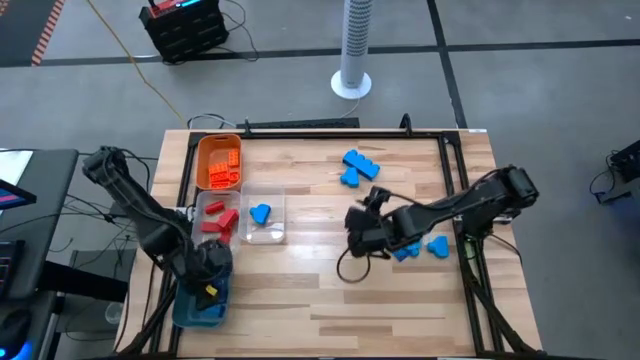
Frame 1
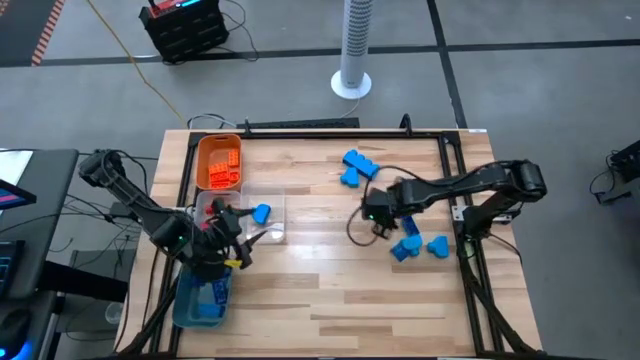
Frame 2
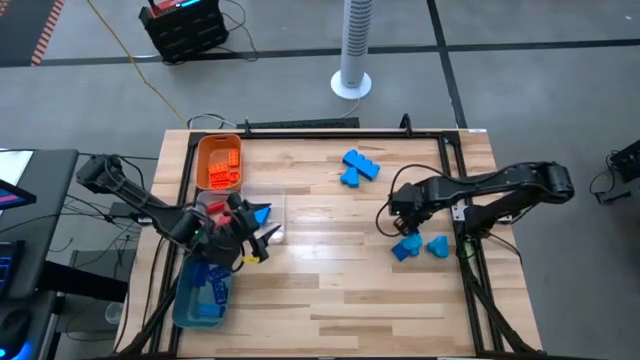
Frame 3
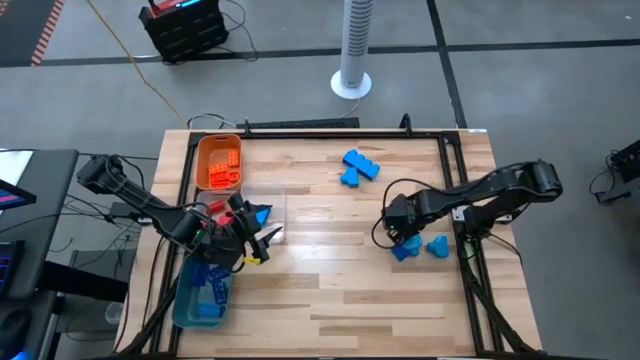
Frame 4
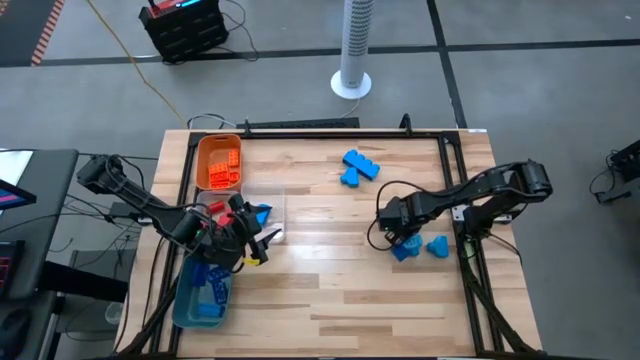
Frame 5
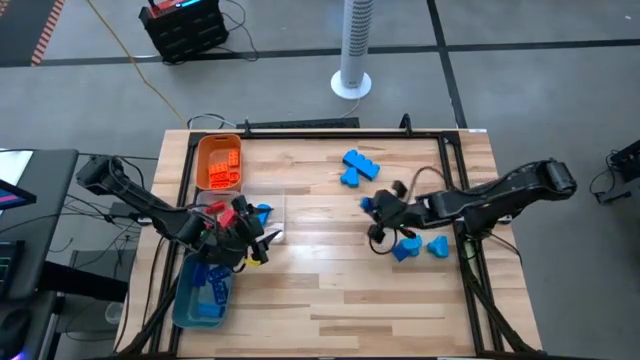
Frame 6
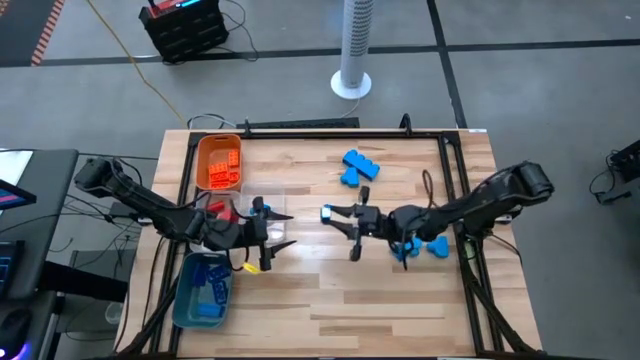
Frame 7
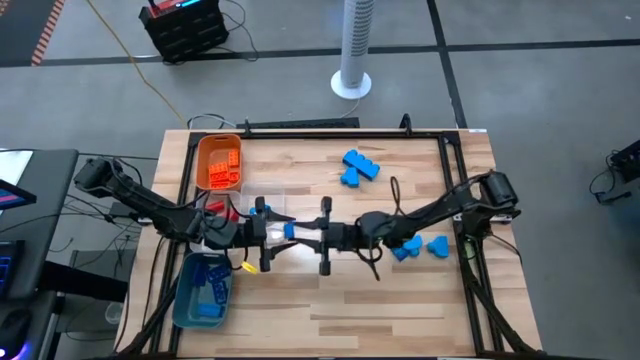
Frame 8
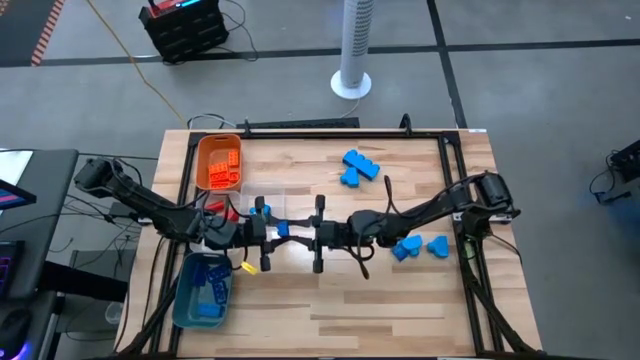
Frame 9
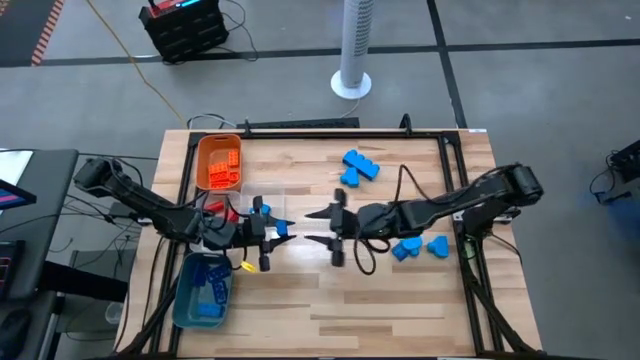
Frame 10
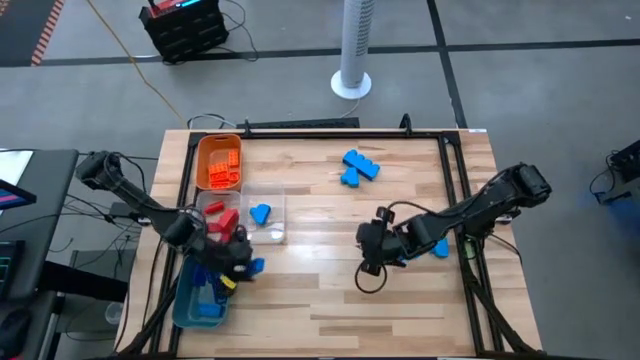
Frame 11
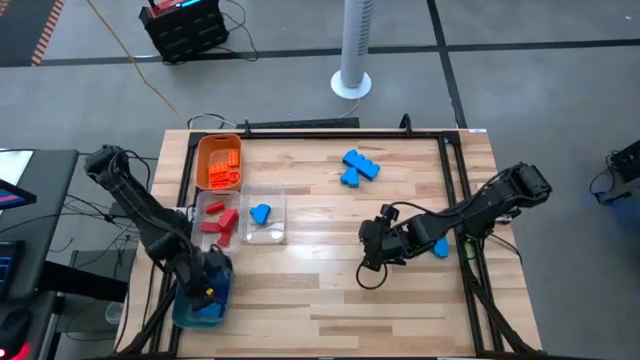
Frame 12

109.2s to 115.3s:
Task: Sort blocks
Put the blue game piece into the blue bin

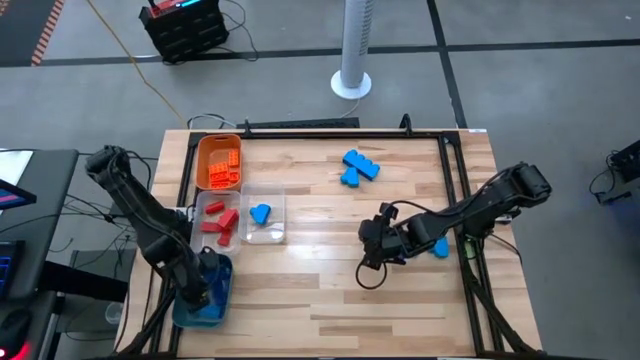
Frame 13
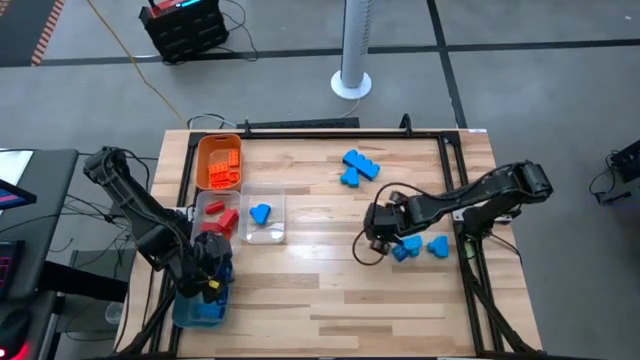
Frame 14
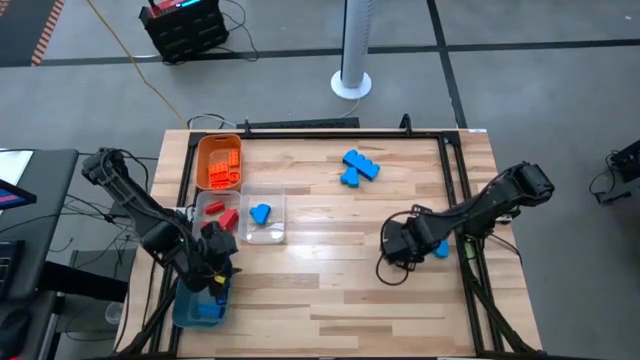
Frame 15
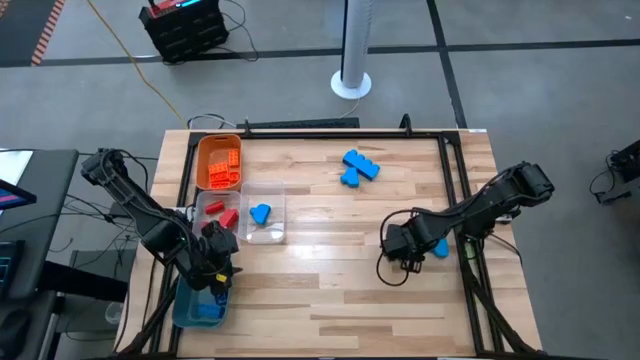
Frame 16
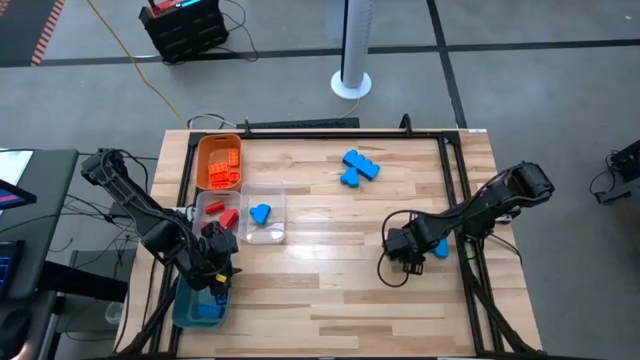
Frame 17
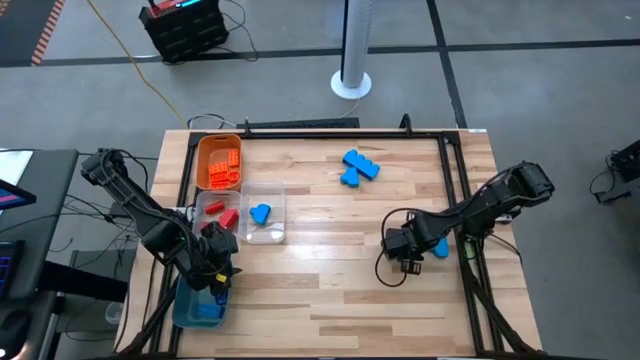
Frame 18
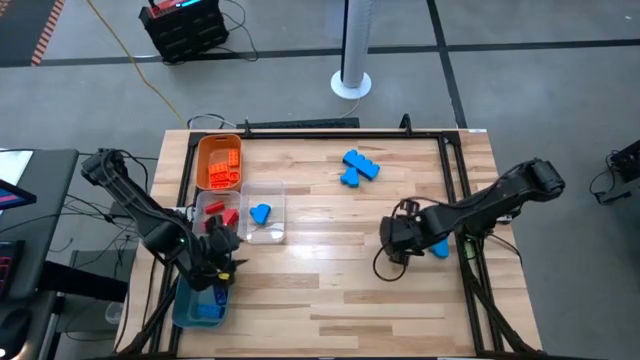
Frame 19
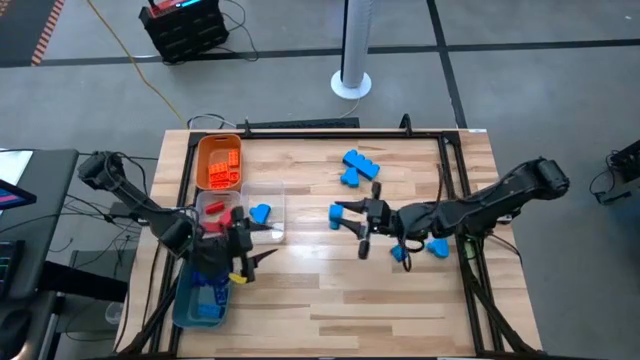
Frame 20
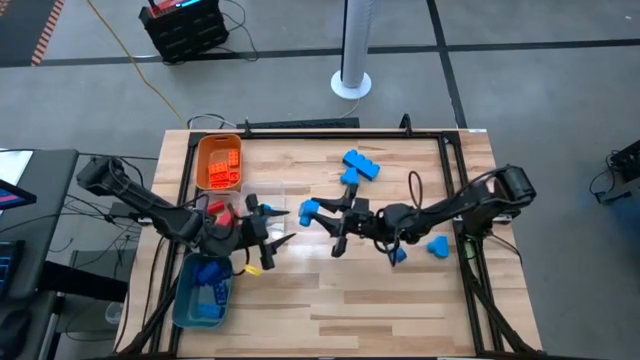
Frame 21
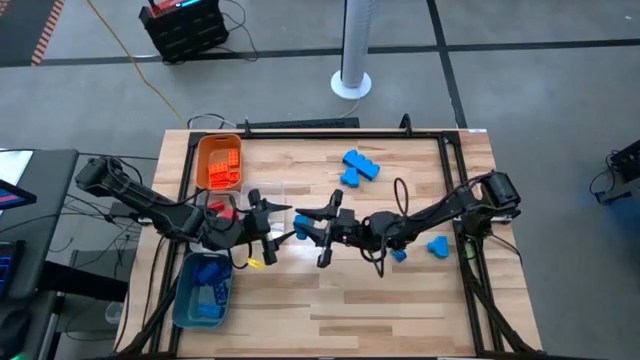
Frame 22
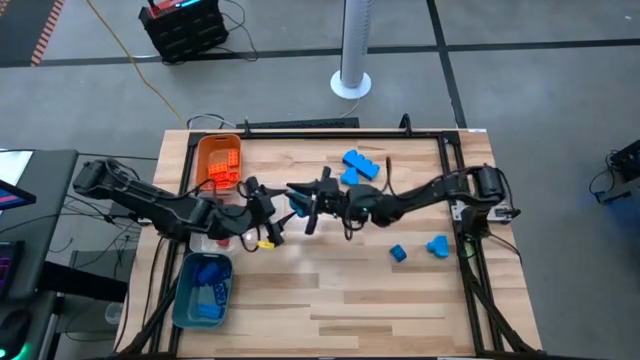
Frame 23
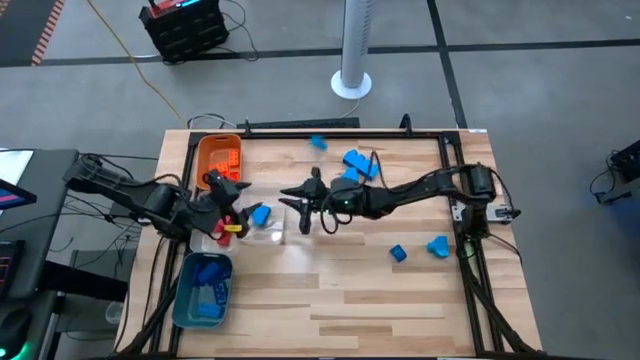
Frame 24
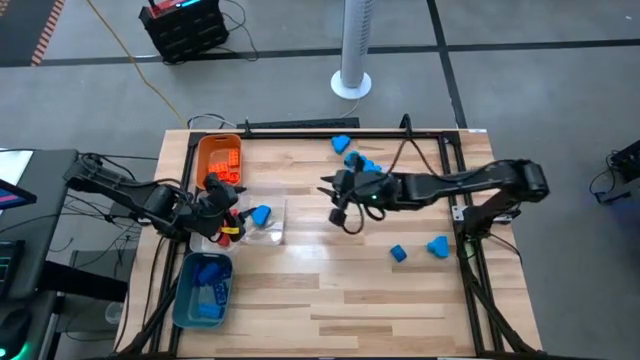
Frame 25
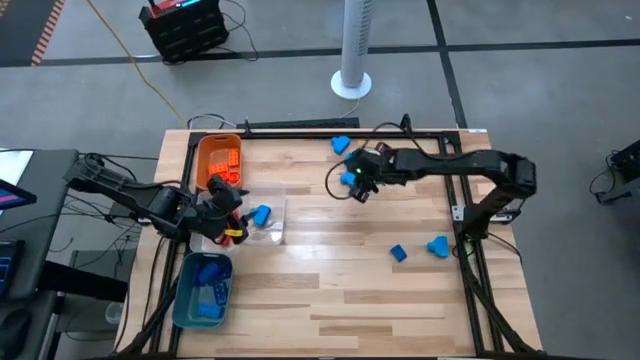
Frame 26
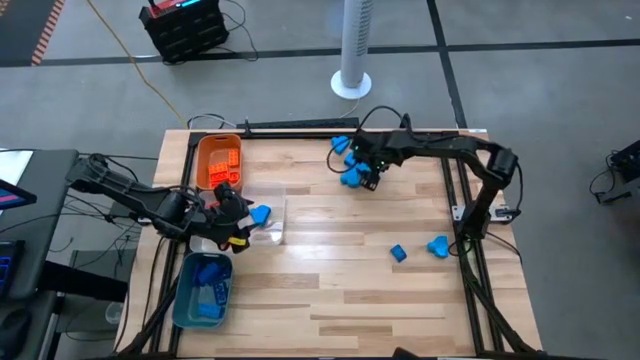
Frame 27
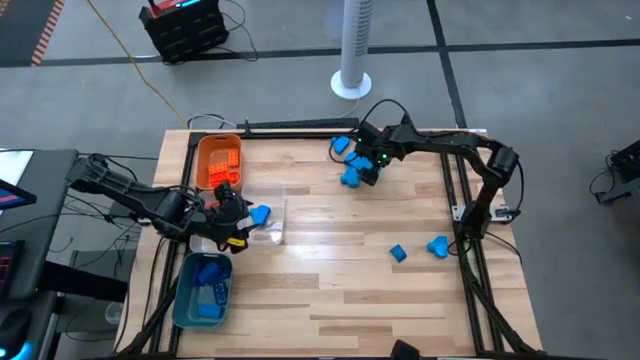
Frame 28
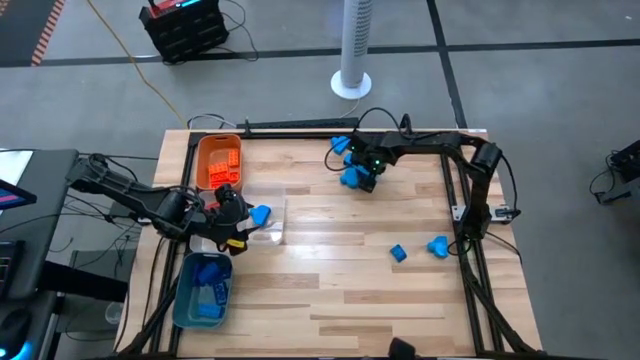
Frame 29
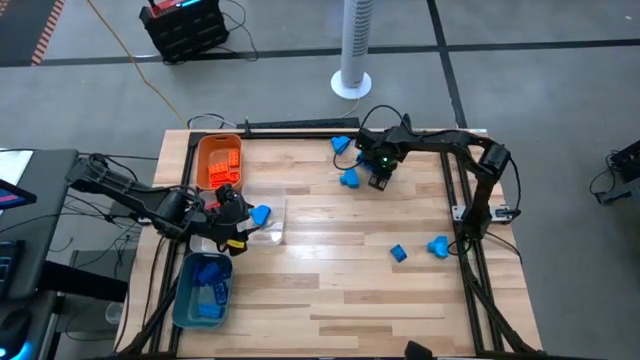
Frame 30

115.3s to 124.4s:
Put the light blue game piece into the right transparent bin

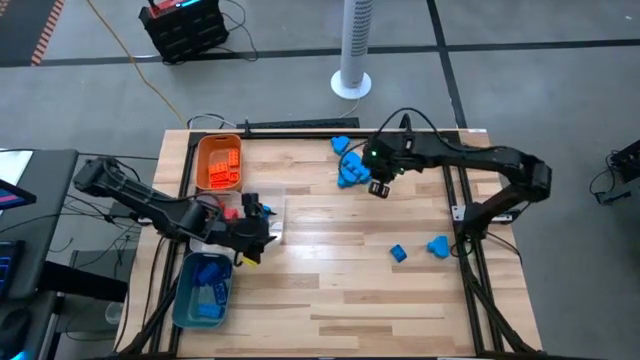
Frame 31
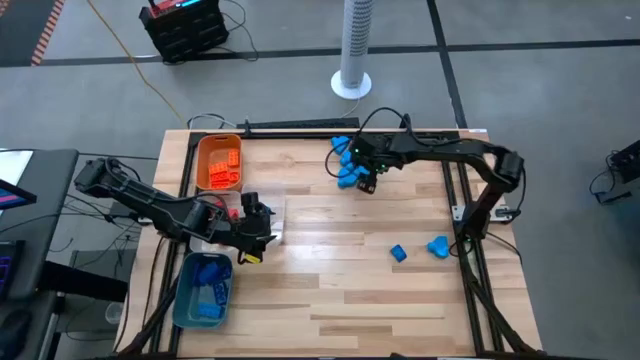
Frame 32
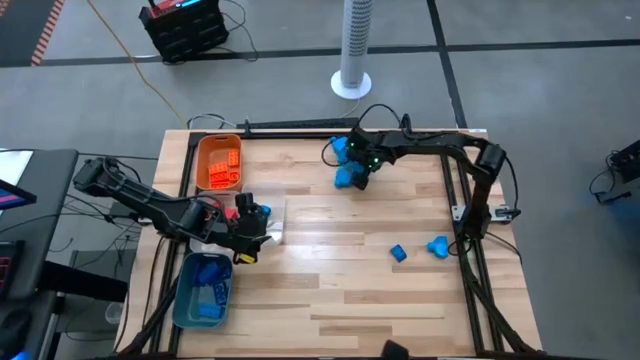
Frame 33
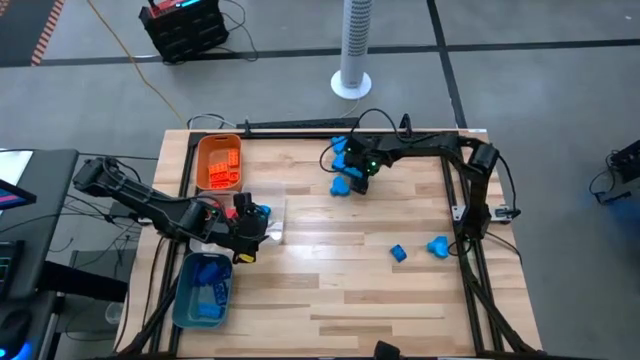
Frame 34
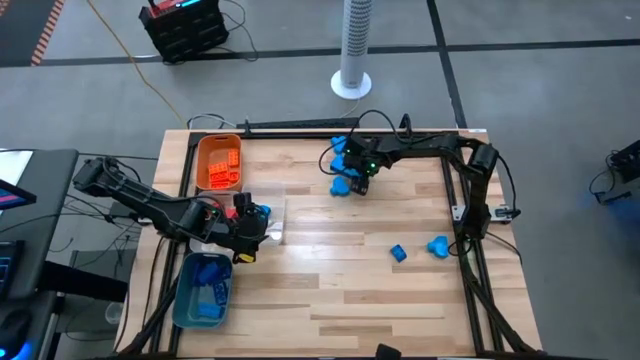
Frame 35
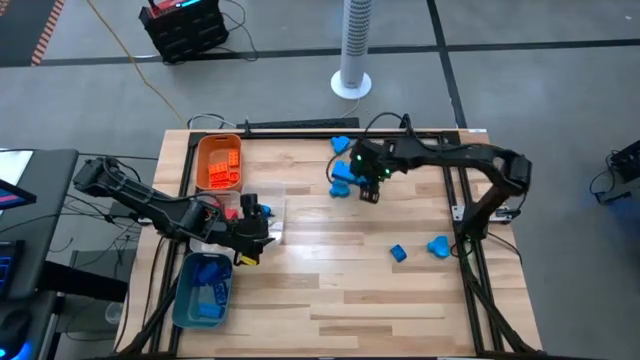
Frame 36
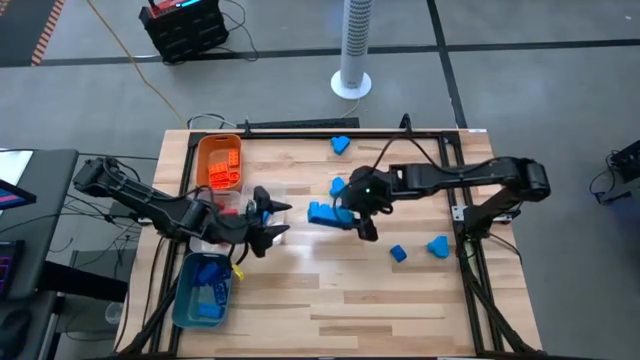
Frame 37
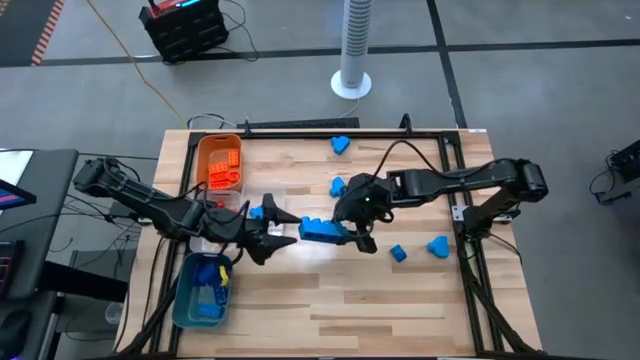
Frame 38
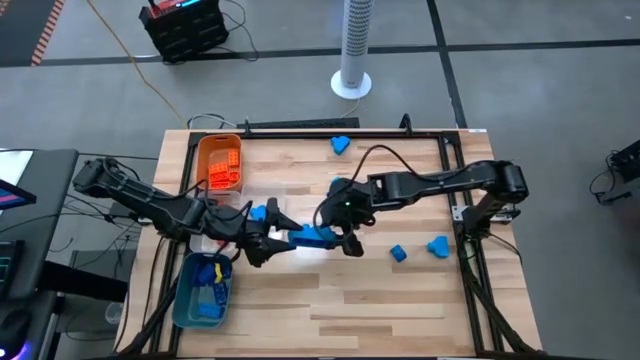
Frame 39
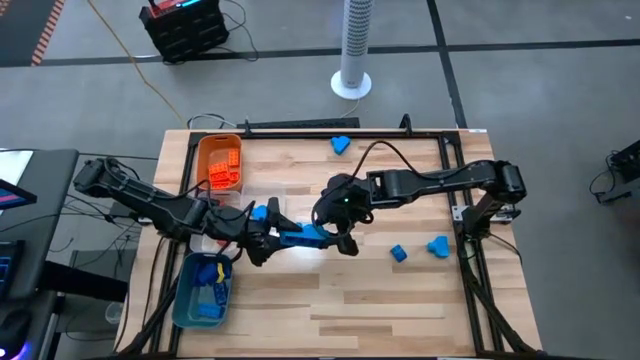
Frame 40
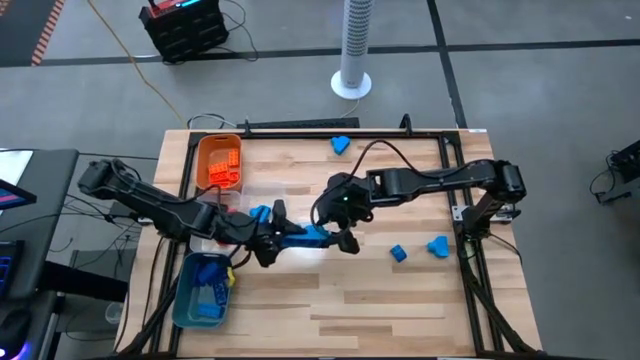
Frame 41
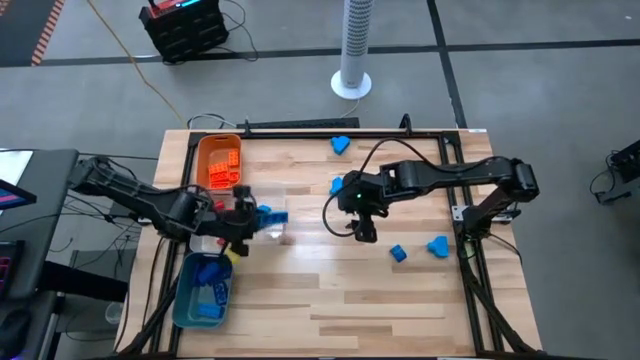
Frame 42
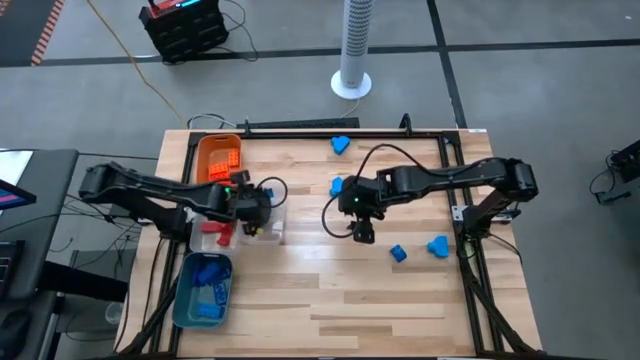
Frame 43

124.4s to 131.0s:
Put the light blue game piece into the right transparent bin
